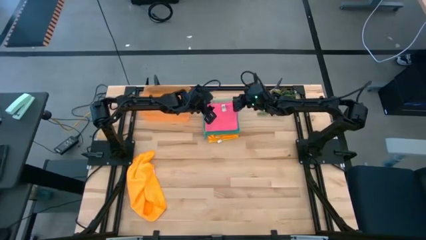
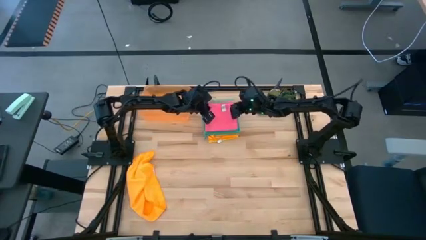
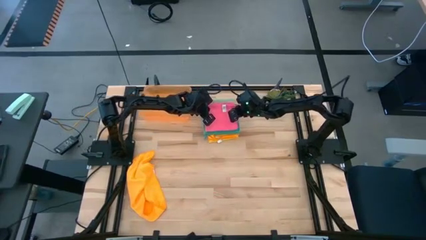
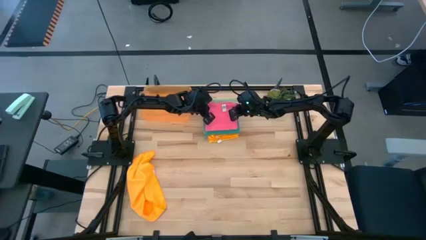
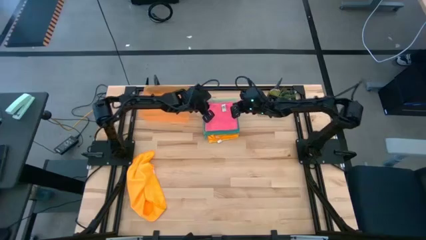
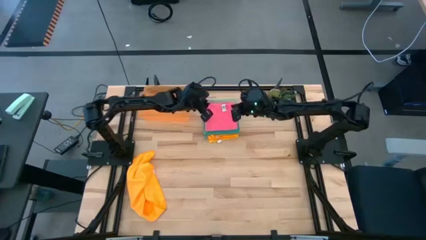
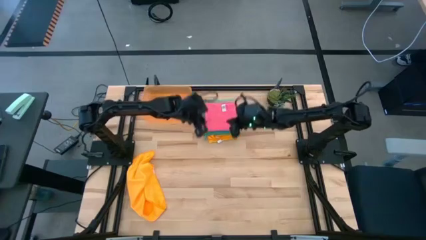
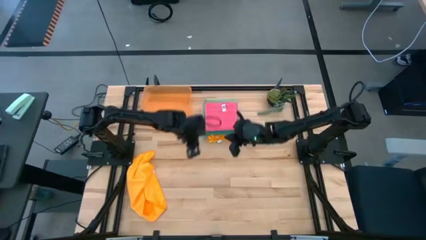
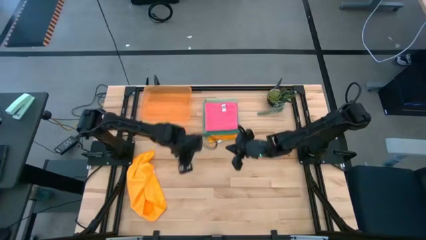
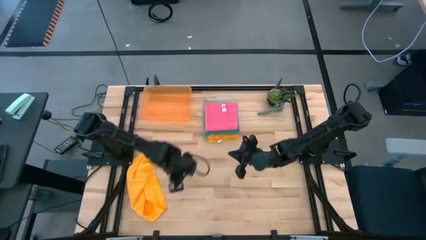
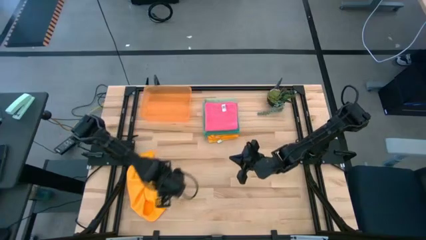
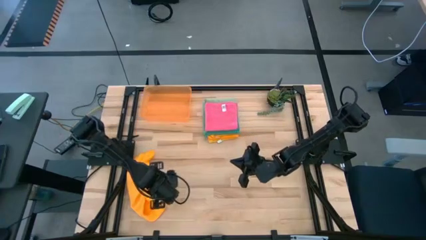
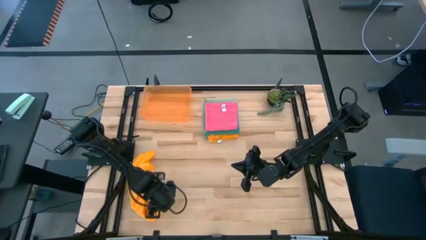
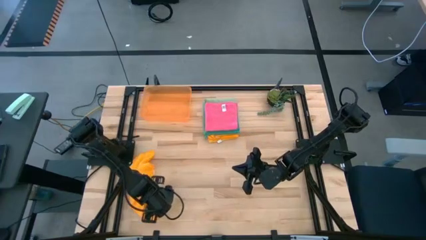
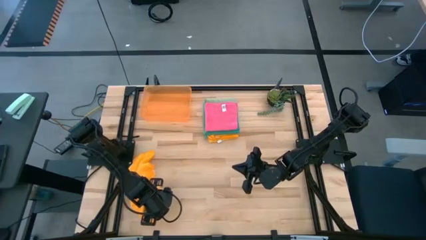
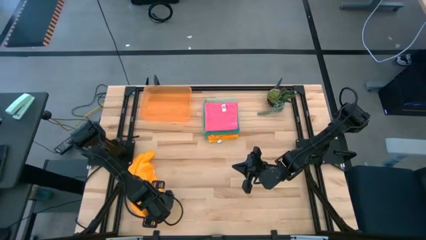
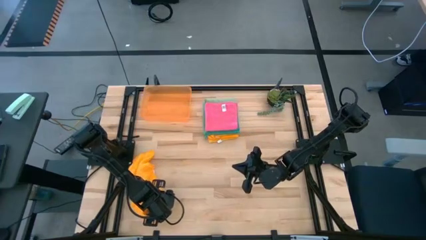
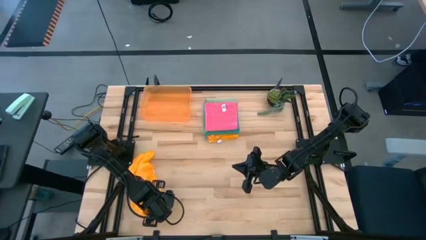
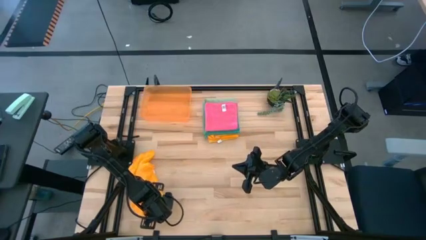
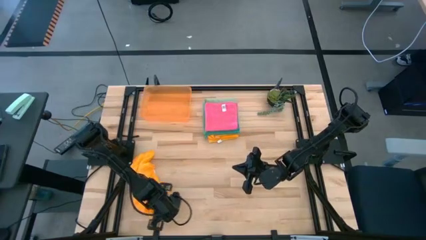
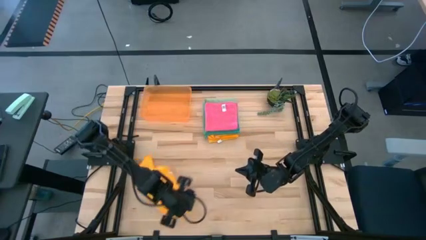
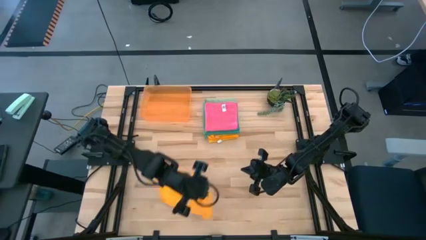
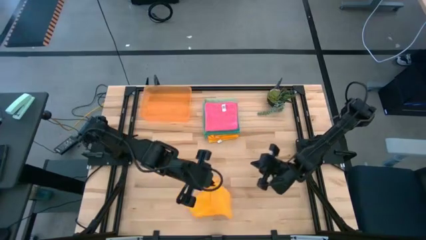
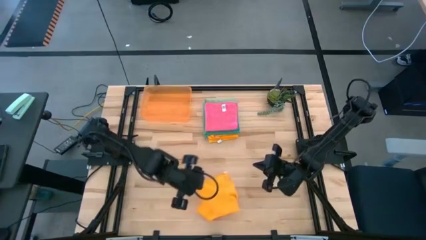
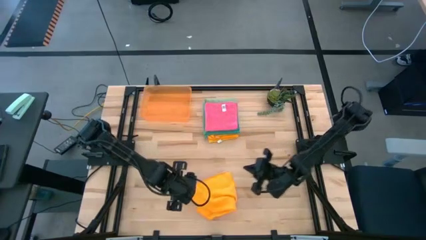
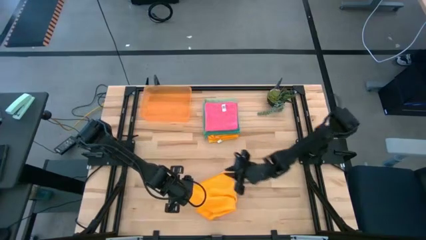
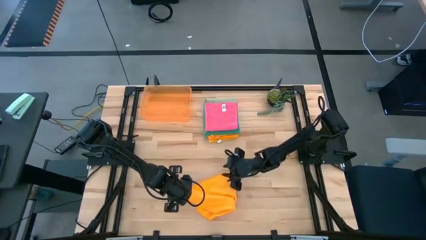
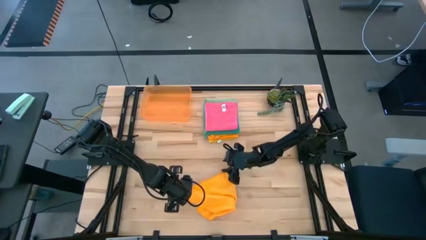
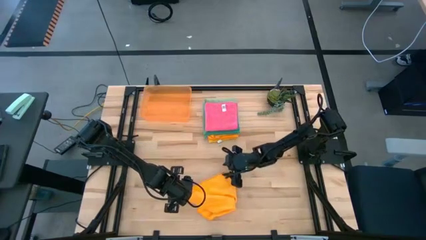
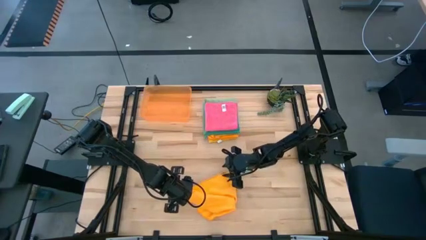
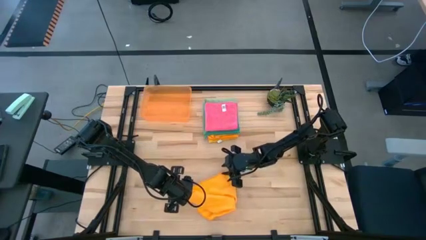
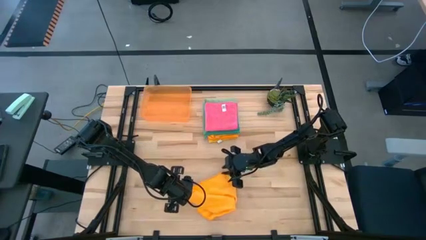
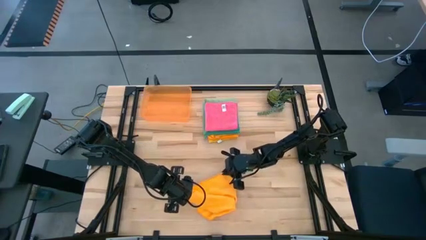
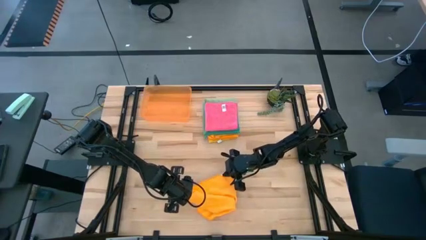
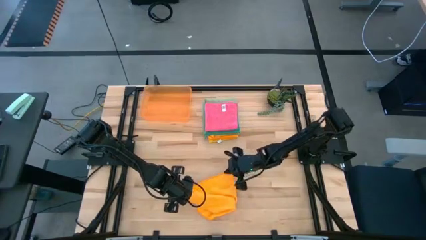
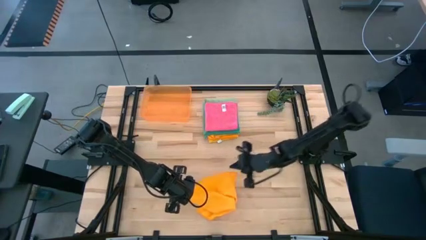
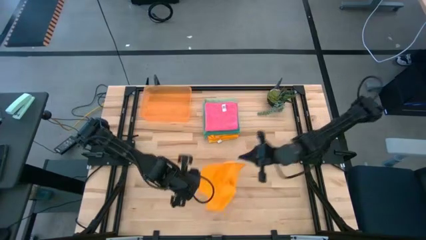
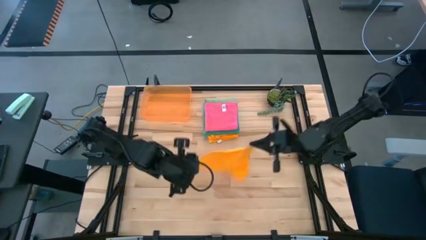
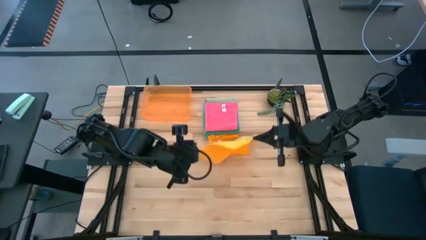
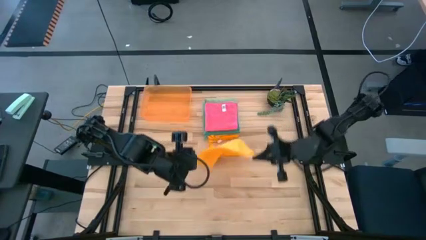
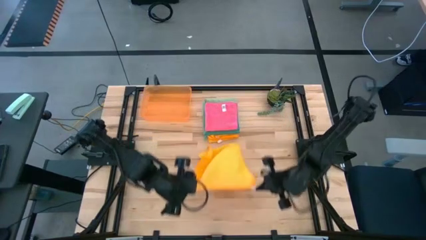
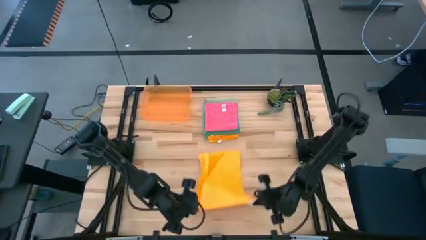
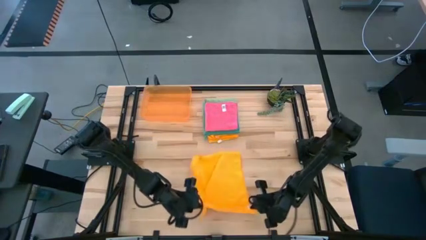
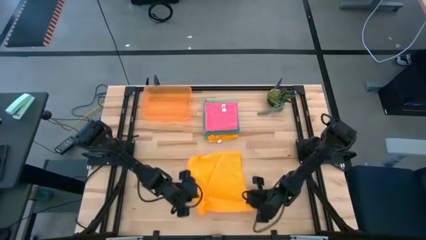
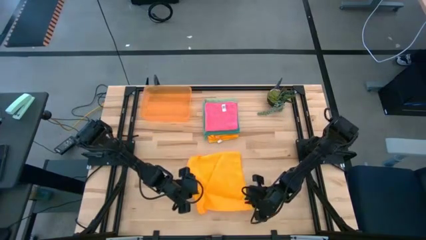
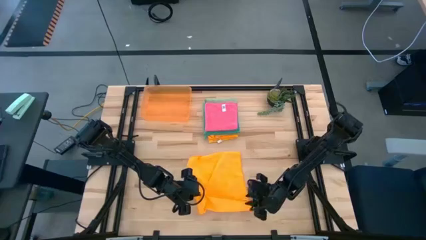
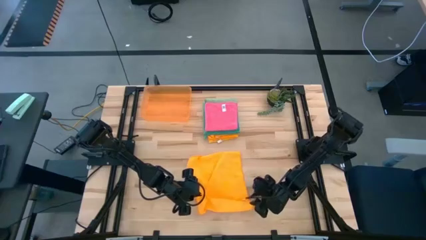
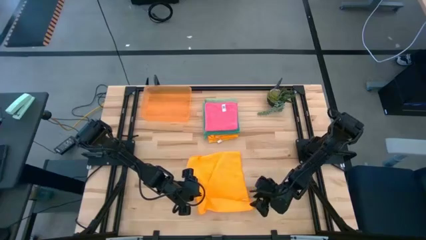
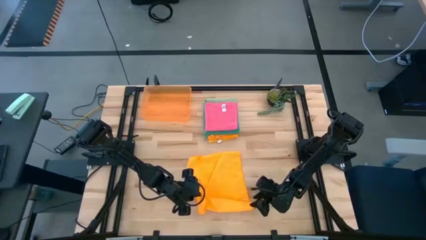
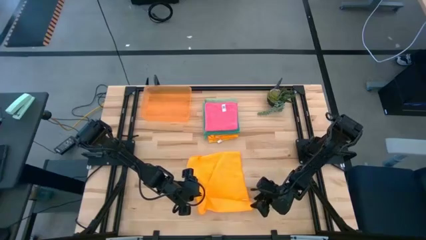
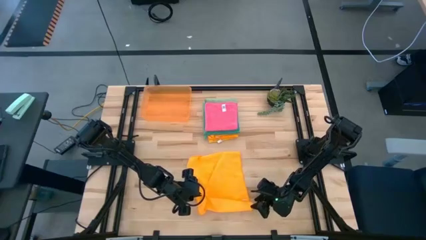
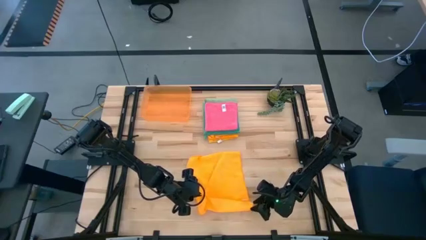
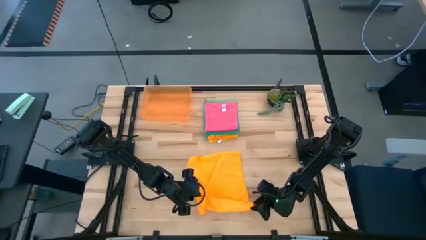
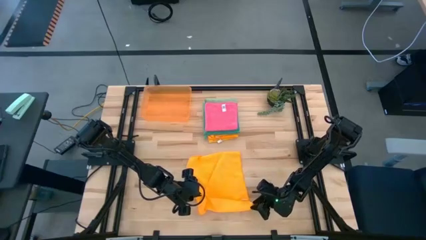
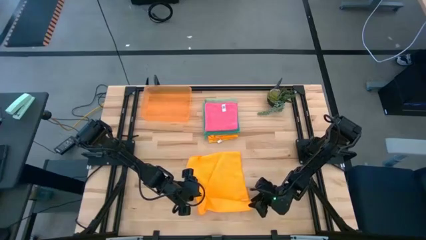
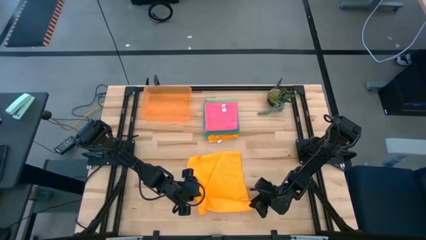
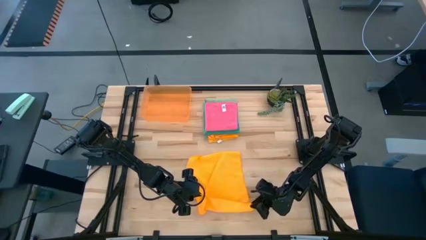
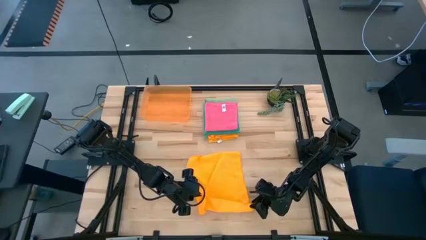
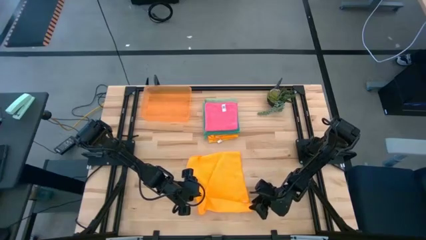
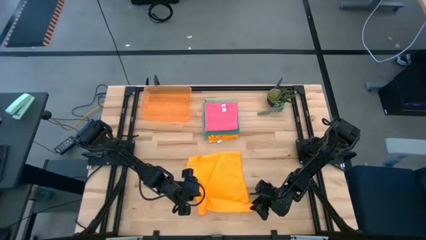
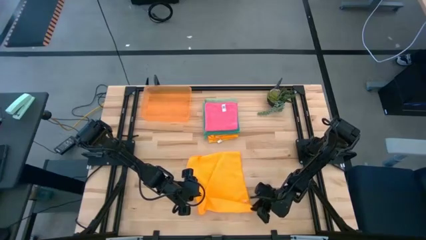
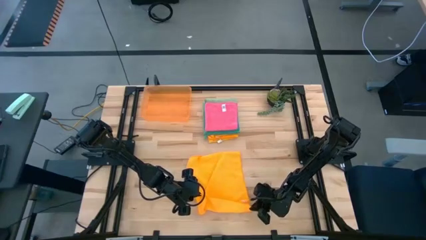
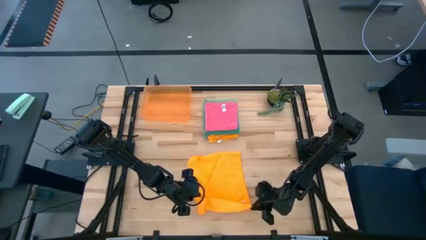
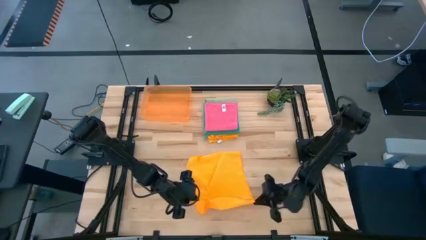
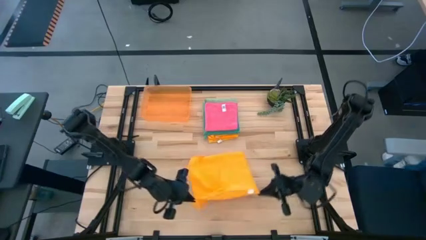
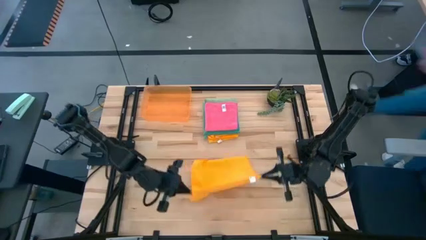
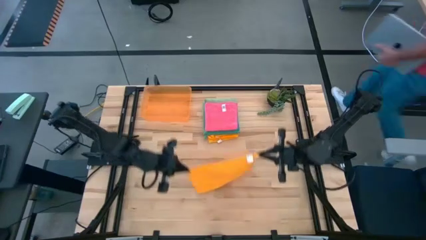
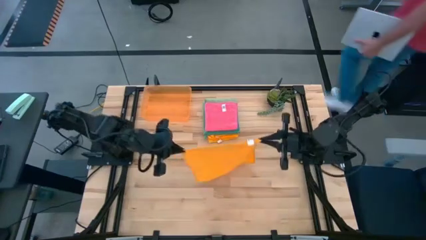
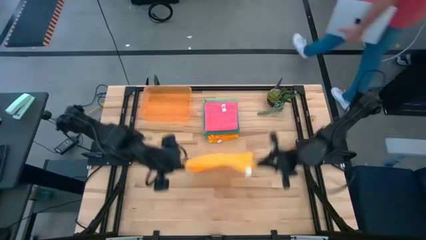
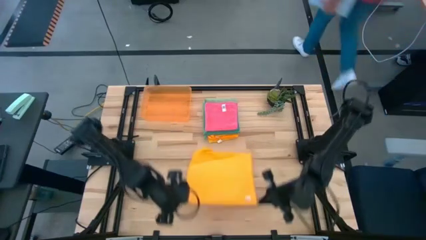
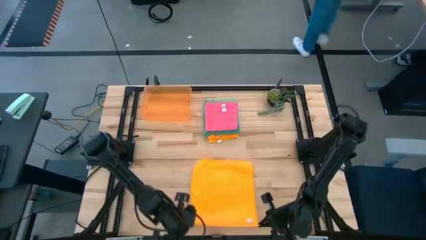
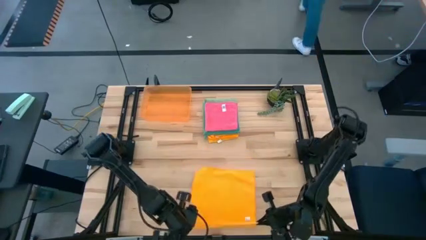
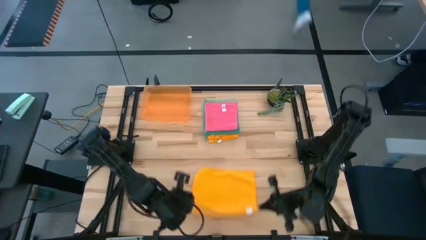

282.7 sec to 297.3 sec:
Task: Fold microfiber towels
Fold the orange towel

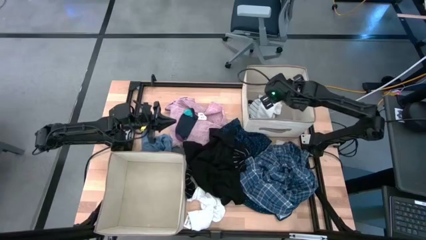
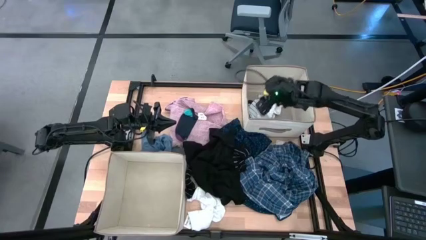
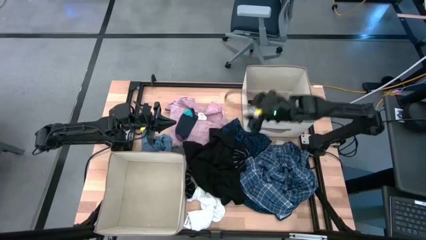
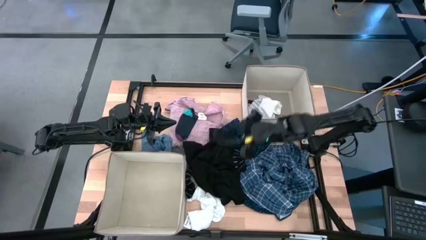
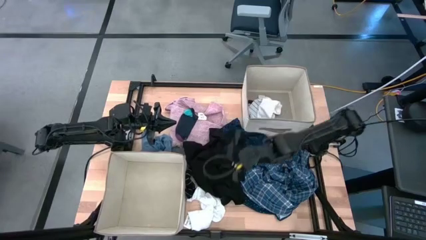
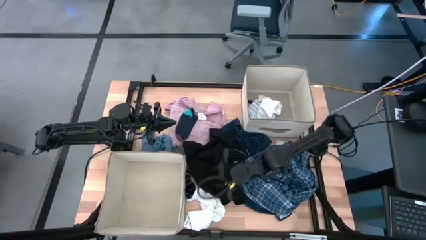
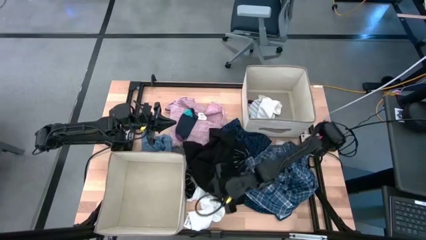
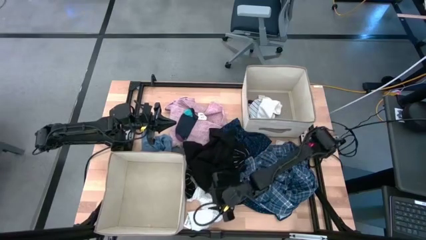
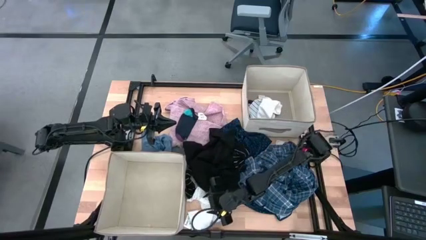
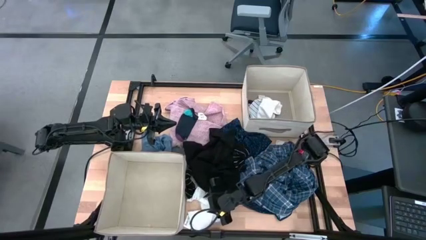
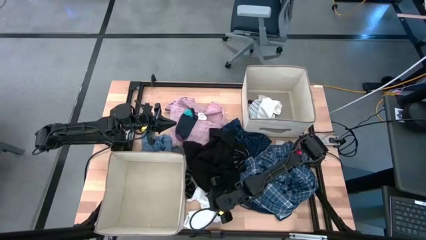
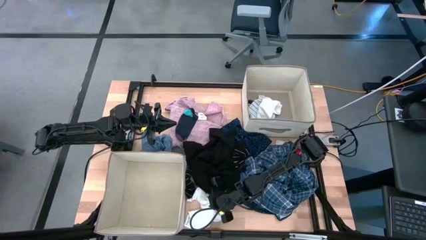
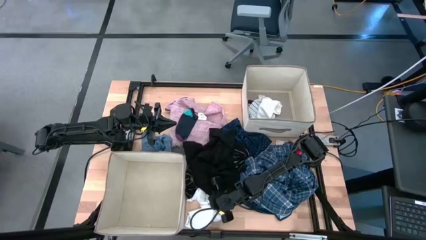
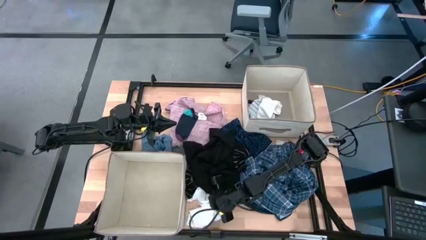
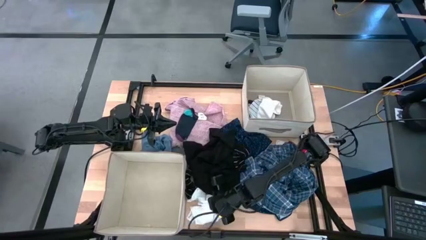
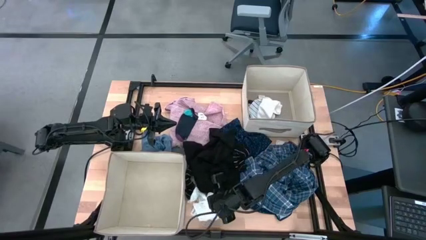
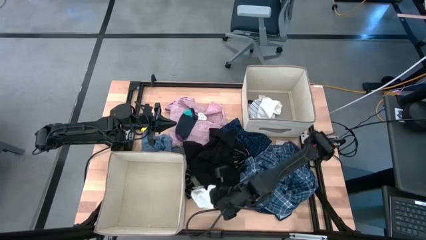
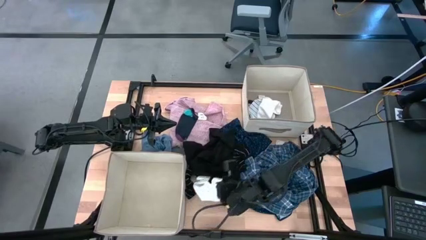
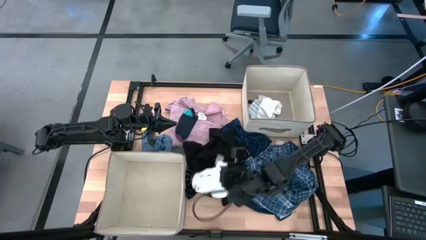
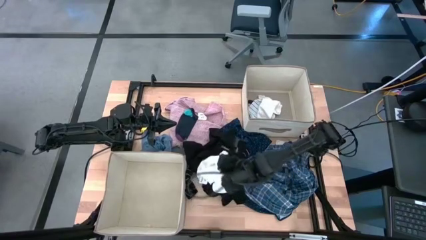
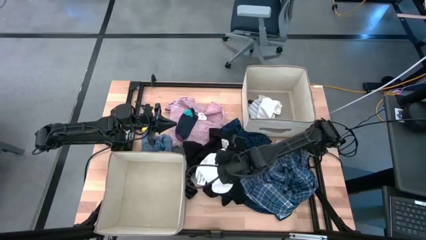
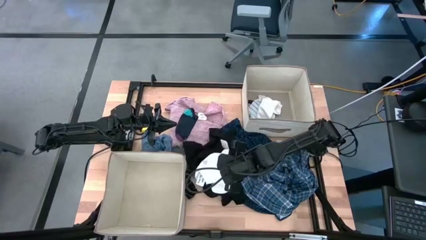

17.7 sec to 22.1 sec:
Task: Sort clothes
Put the white sock into the top white laundry organizer
